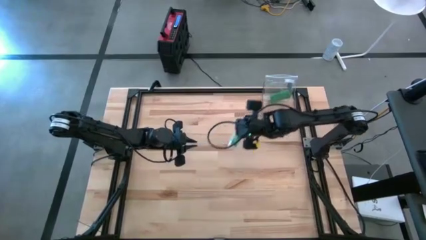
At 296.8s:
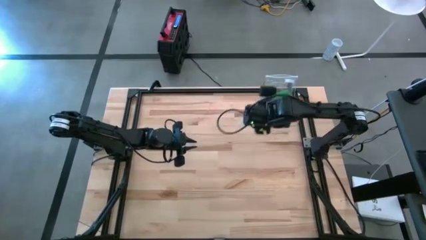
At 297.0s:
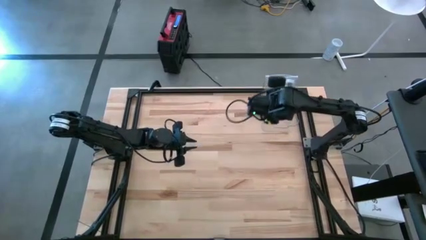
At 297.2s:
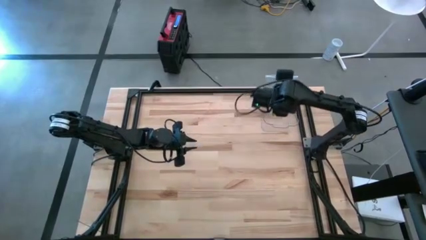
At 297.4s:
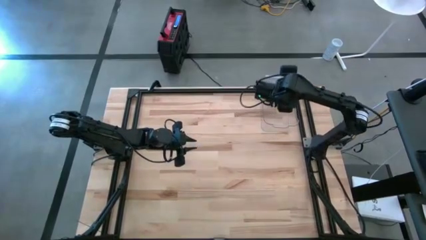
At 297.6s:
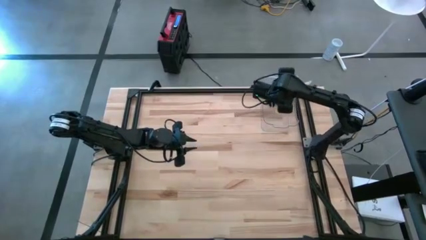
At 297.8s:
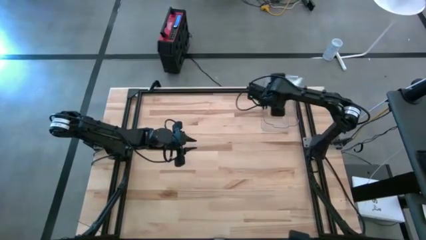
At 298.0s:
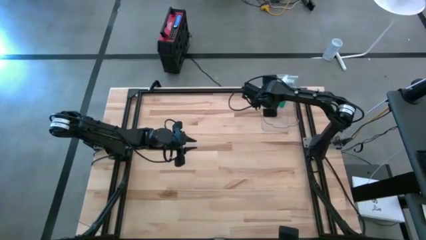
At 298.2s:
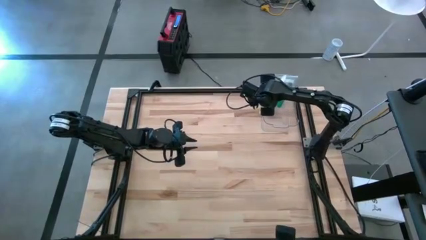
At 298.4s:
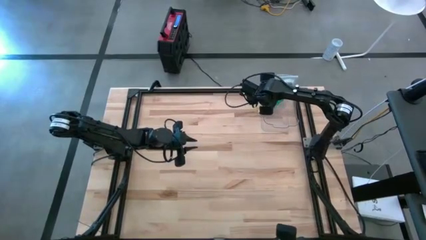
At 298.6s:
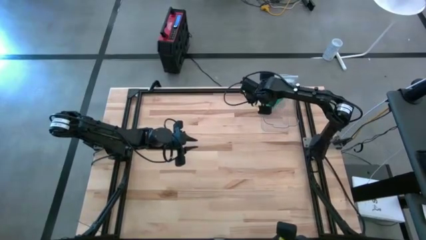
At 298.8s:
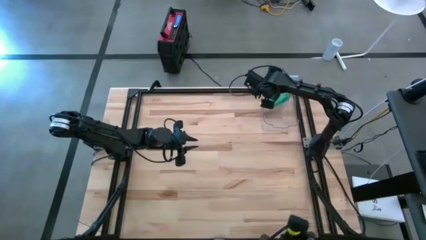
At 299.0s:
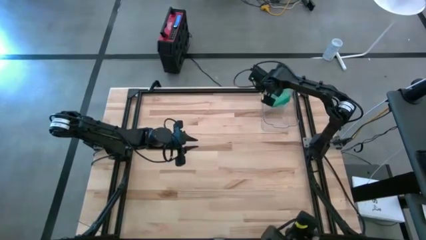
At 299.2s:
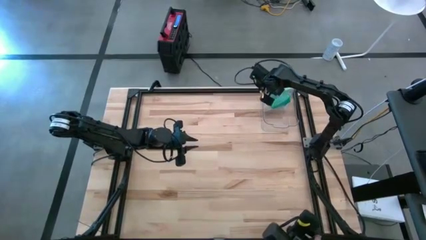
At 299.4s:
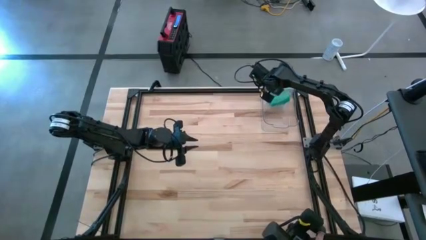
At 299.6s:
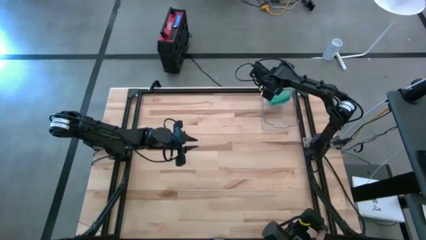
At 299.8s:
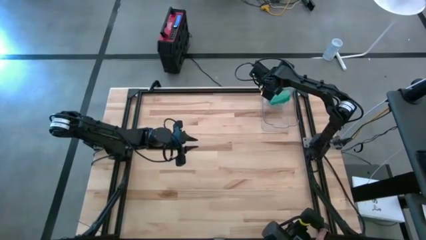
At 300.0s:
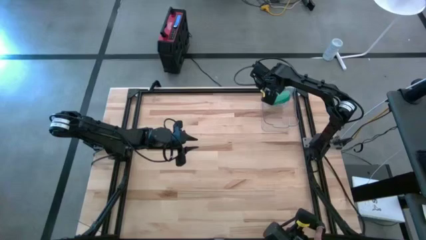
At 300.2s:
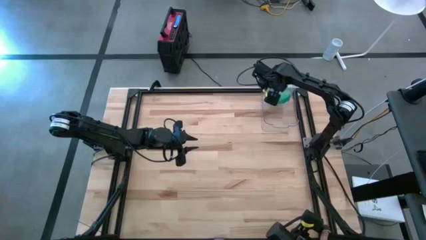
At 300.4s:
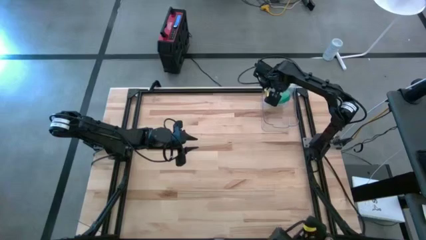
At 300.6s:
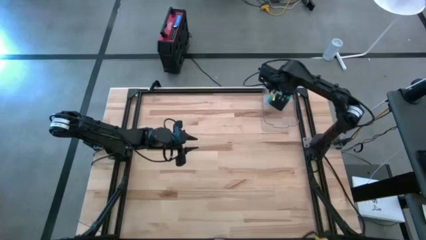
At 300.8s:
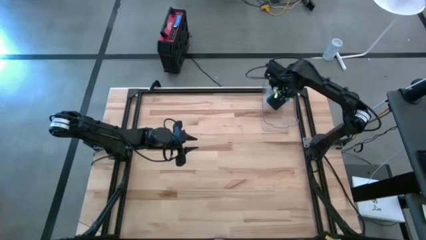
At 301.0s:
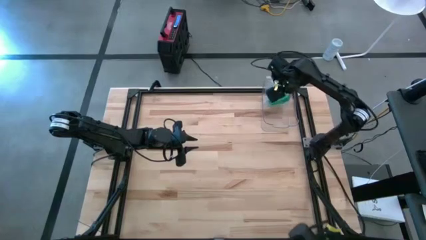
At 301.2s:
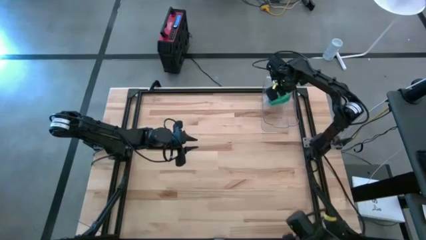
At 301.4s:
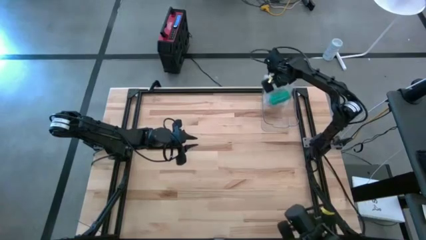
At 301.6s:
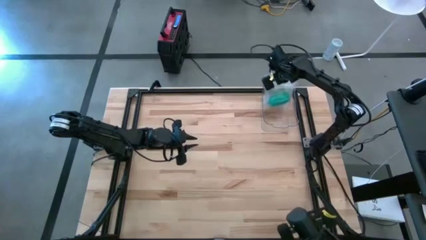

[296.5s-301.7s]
Task: Roll bandage
Put the transparent zip bag into the transparent bin

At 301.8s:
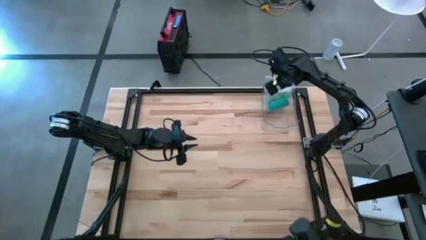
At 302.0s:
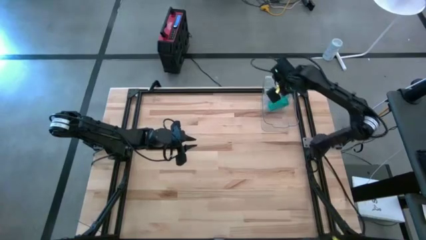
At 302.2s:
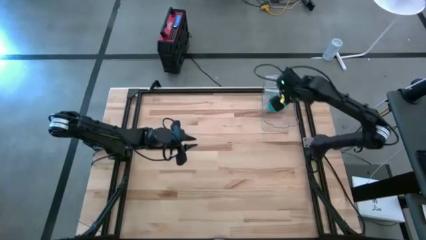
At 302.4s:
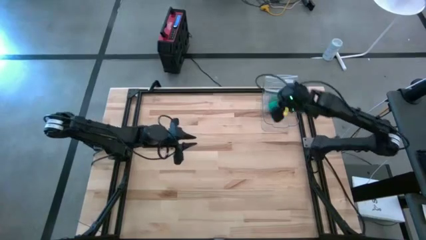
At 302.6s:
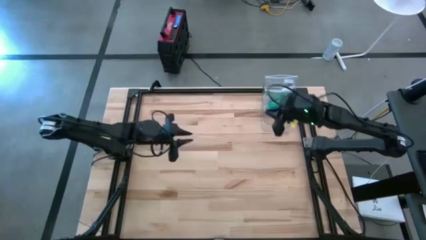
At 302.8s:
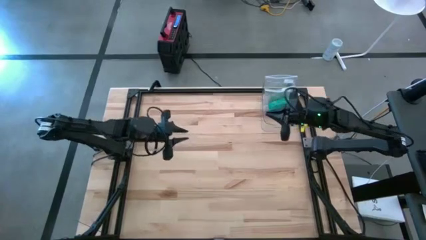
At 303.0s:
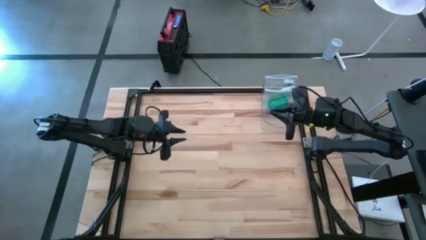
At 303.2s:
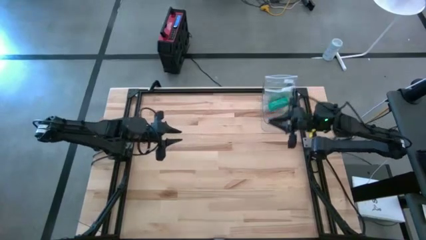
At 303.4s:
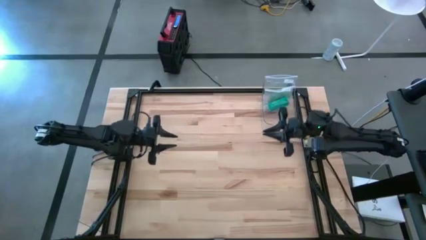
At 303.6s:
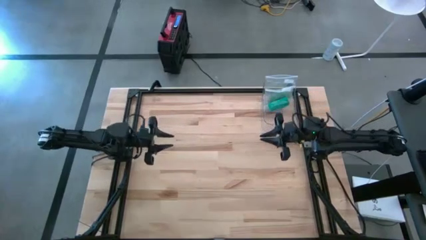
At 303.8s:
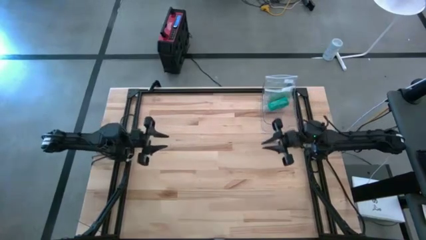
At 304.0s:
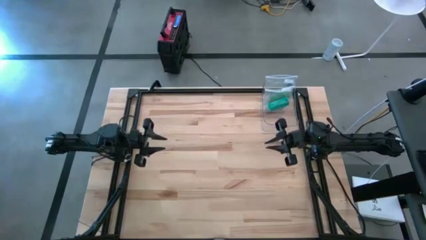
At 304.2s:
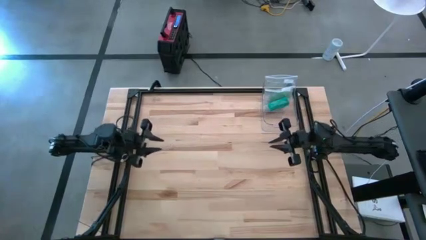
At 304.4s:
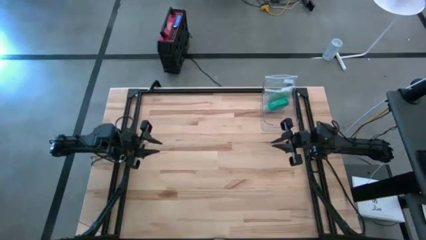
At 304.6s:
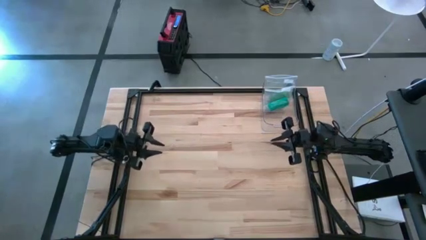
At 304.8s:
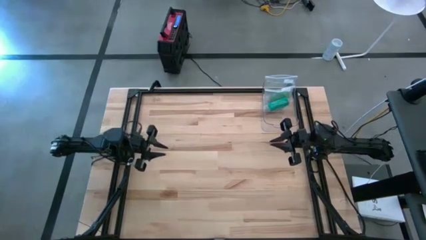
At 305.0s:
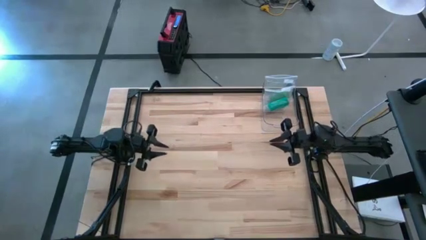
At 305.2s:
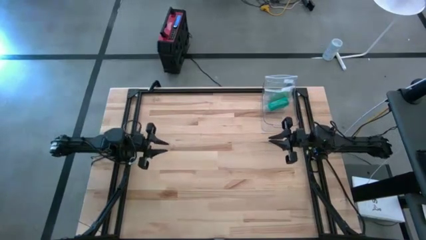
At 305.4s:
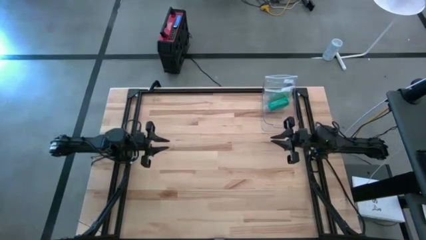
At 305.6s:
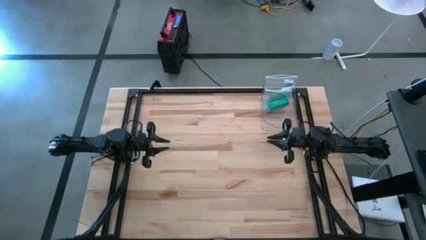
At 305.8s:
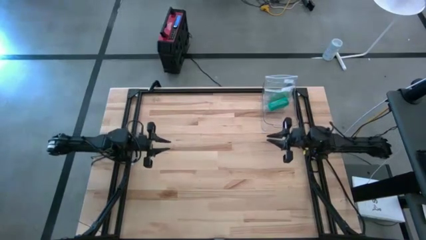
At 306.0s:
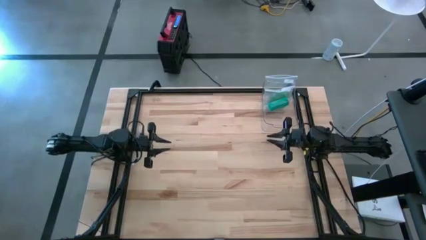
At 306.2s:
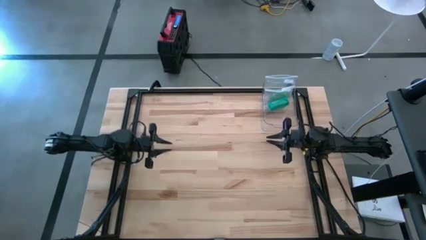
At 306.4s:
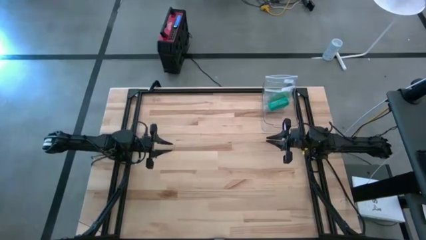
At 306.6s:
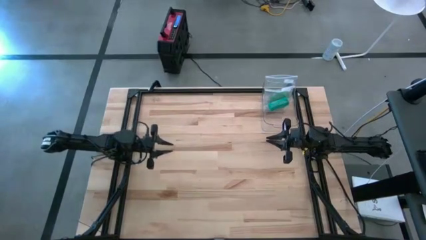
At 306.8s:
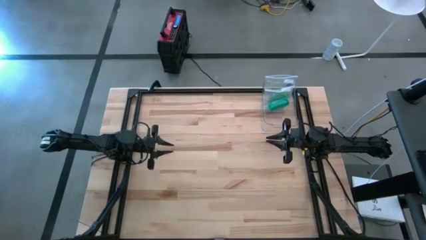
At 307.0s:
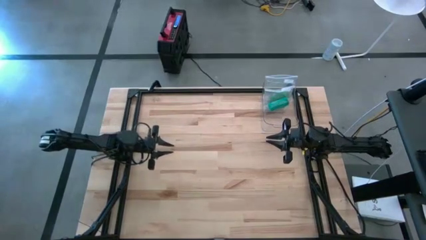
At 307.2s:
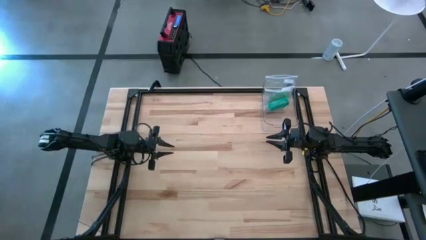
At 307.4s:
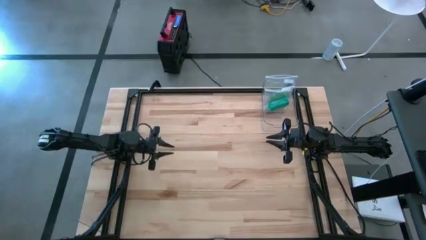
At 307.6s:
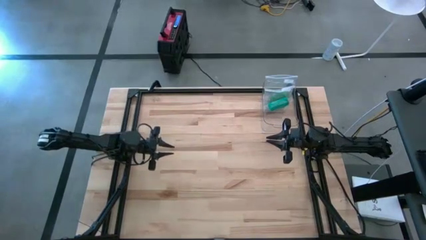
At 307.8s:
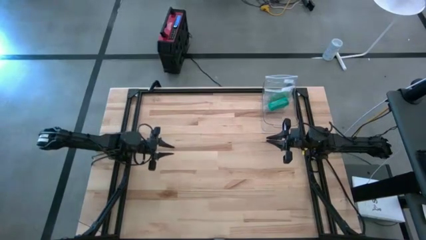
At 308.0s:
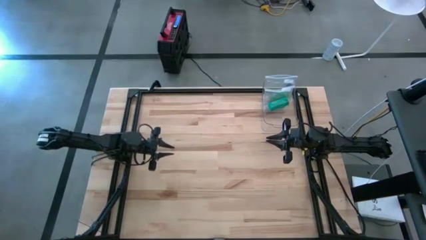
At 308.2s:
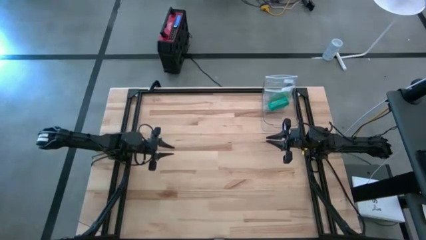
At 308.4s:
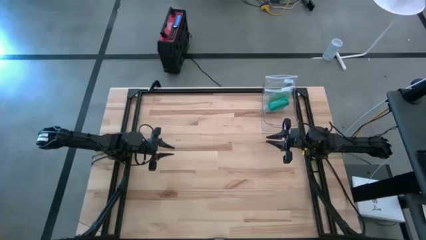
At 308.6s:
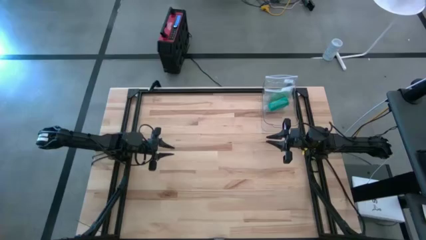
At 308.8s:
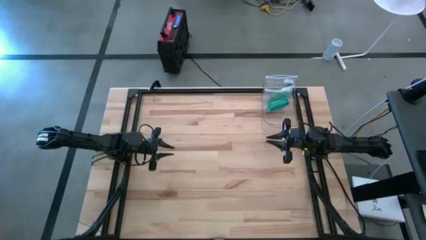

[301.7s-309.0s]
Return to Home Position

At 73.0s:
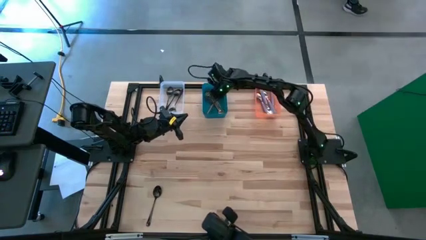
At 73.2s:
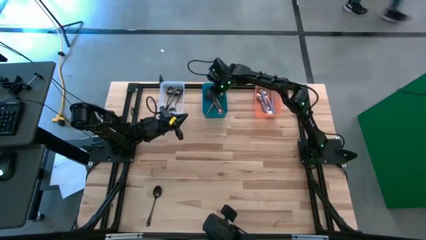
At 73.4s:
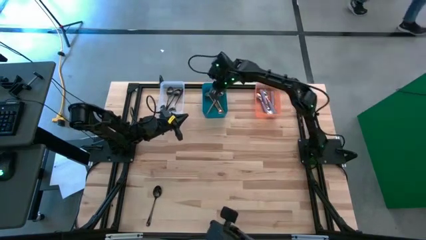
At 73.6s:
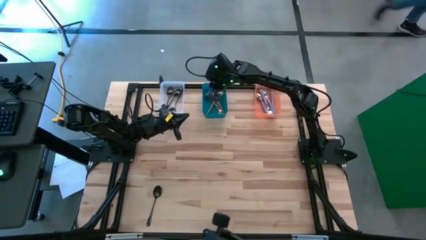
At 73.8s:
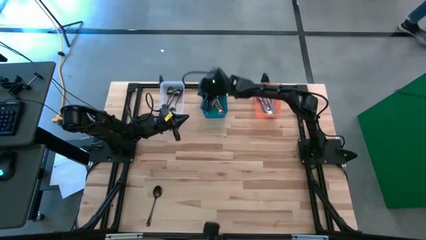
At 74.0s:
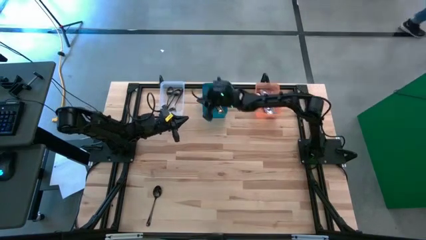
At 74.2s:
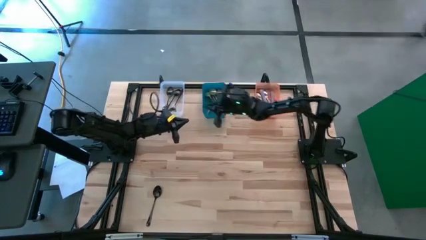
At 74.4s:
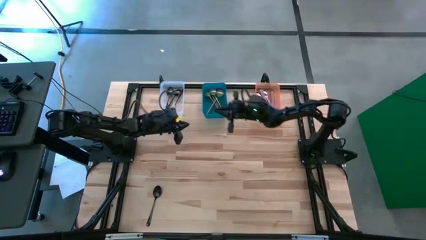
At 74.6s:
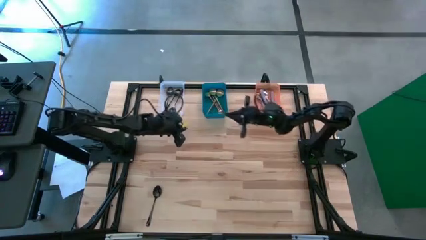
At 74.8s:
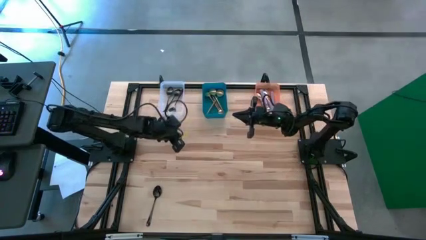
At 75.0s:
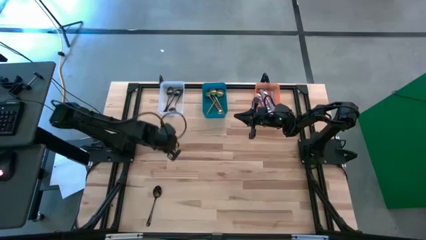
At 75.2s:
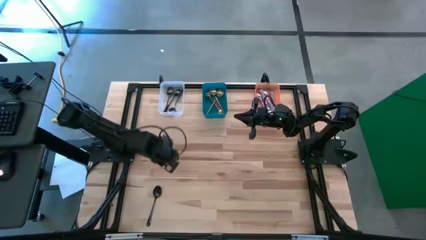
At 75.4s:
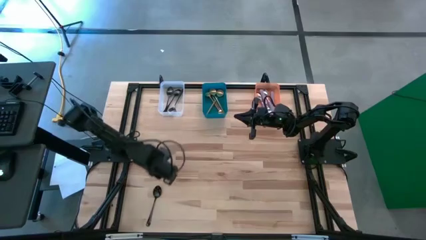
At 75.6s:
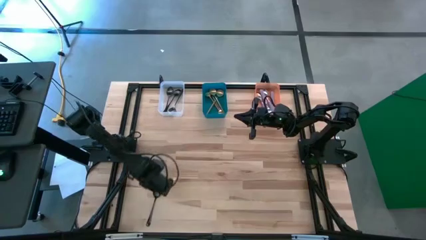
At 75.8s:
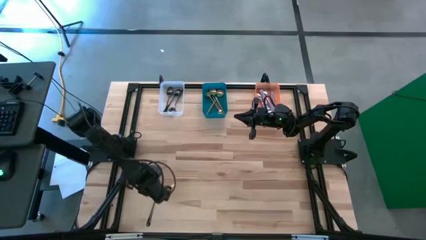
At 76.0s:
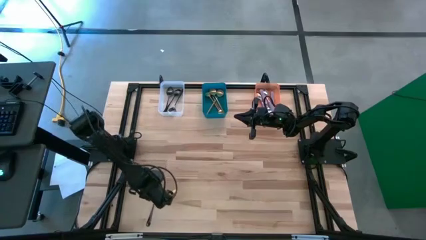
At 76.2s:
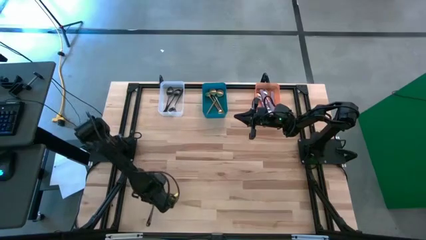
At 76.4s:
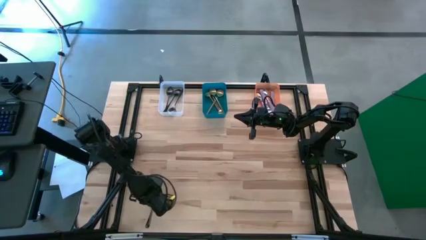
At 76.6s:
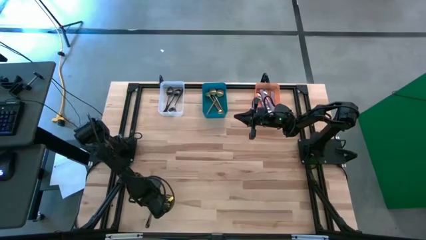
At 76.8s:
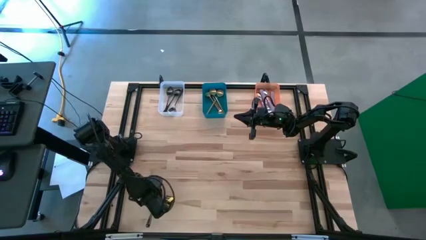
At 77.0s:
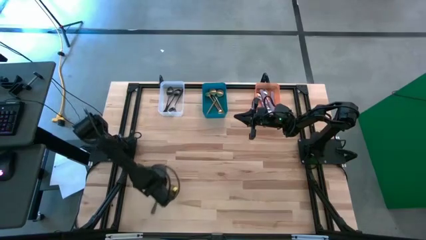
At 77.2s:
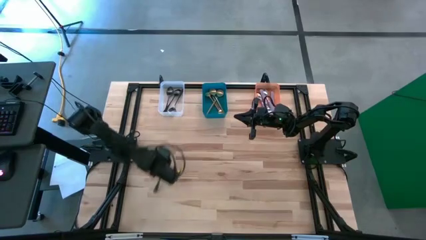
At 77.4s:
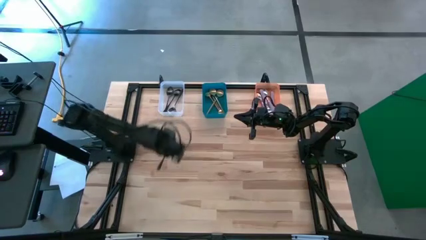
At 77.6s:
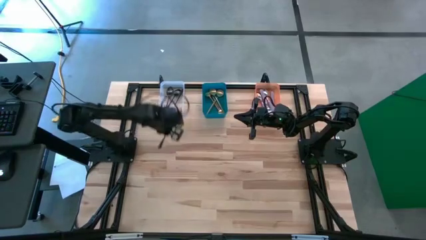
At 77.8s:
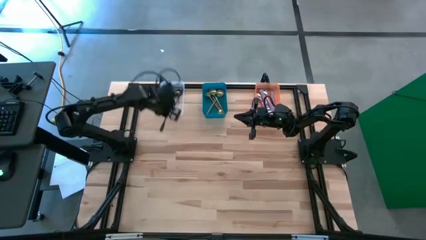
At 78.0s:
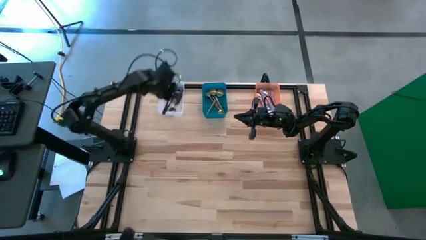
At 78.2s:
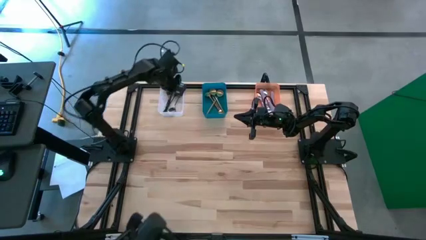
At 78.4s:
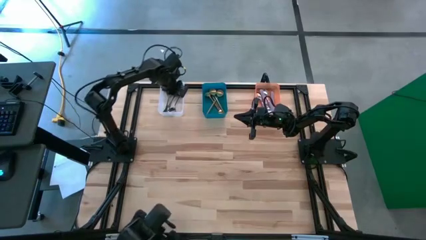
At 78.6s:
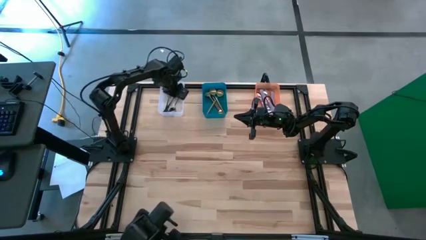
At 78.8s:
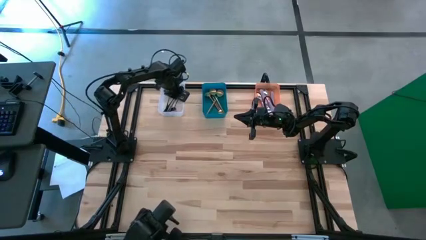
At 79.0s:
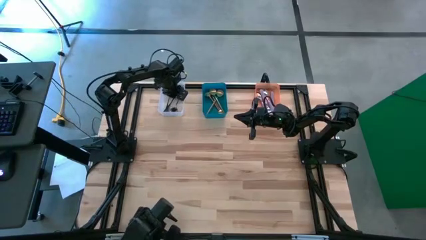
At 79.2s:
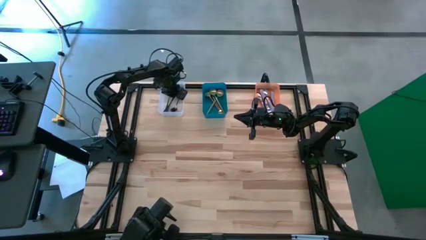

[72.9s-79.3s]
Task: Sort silverware by color (type)
Put the black spoon into the transparent bin
